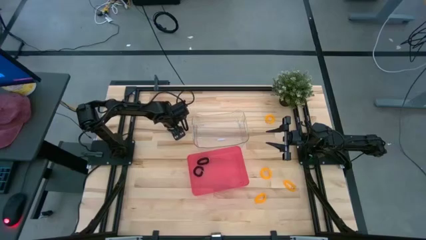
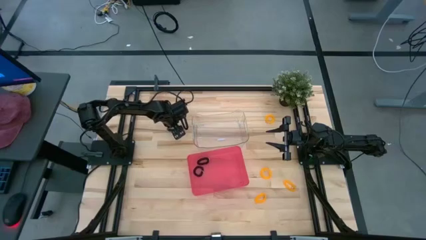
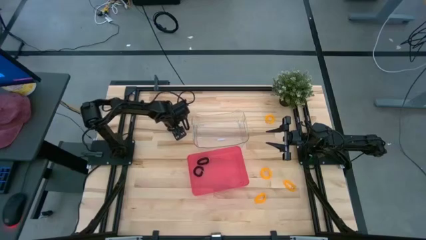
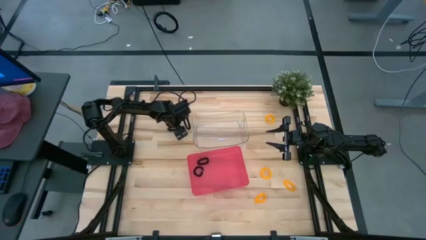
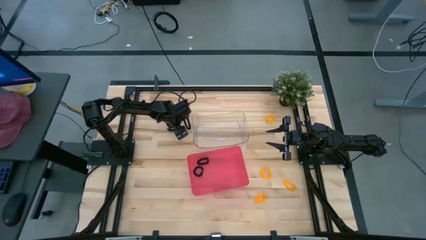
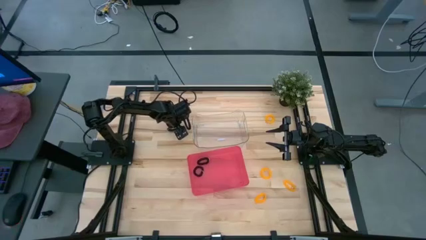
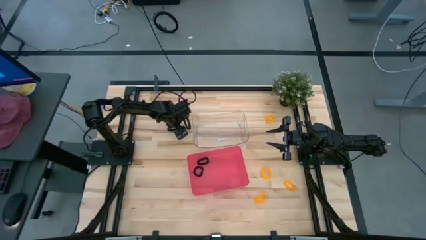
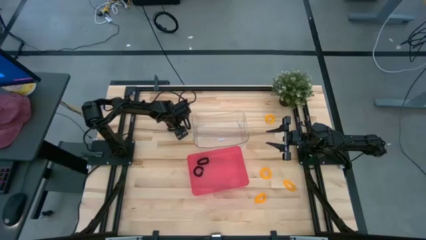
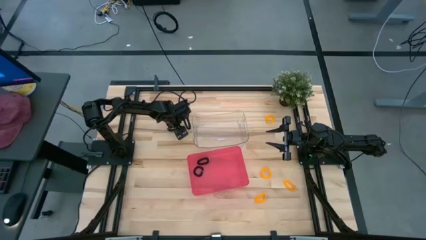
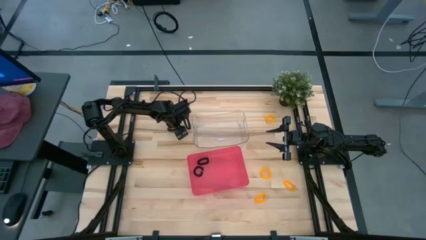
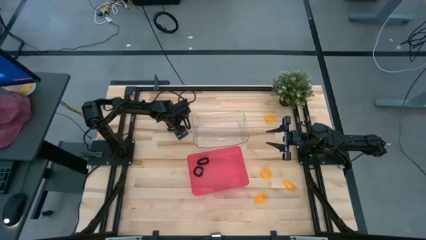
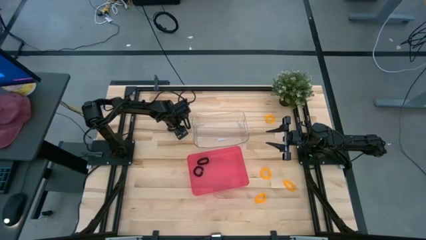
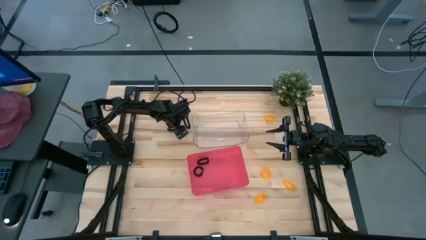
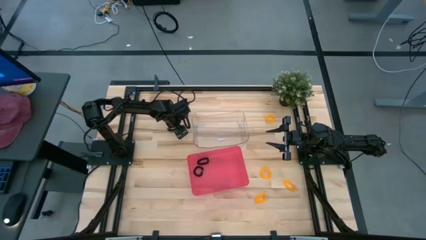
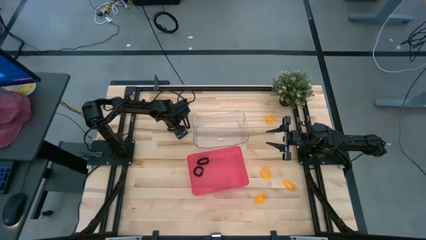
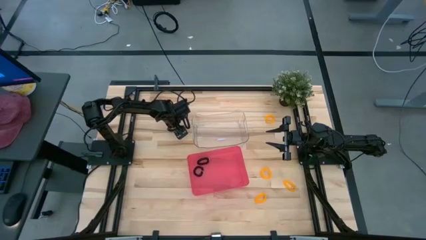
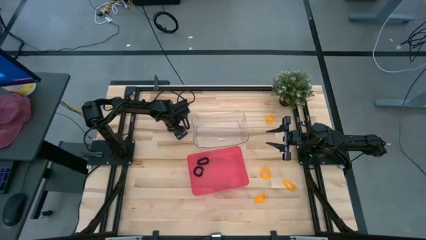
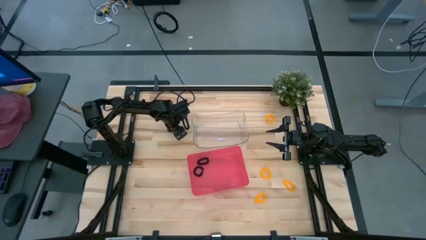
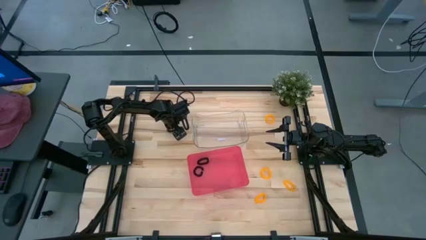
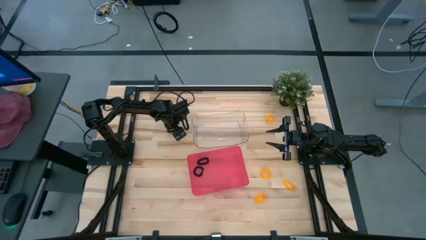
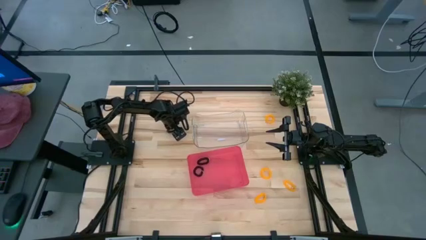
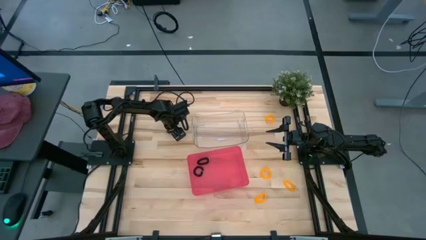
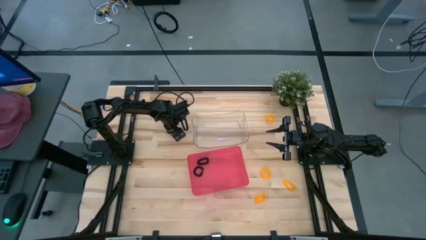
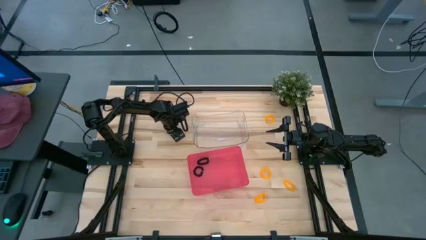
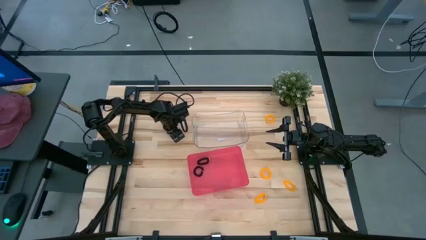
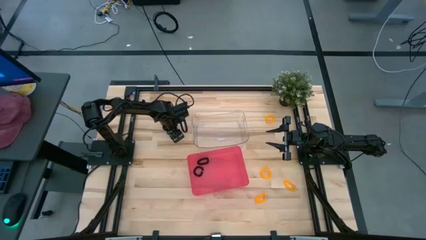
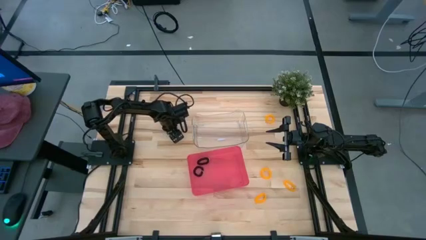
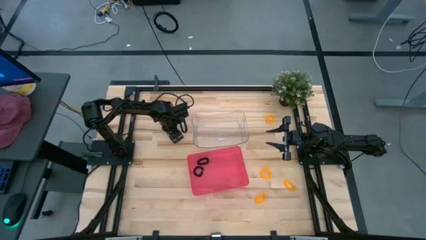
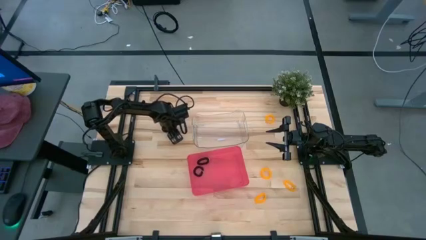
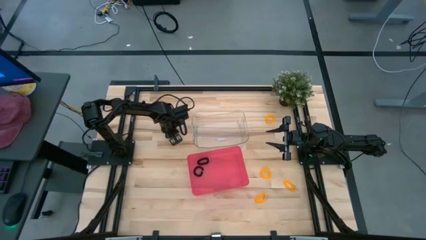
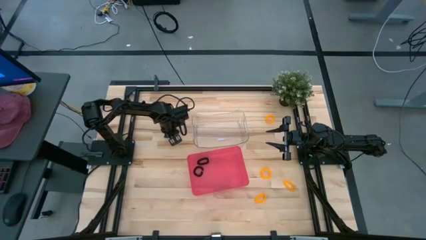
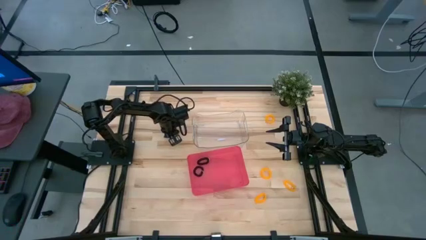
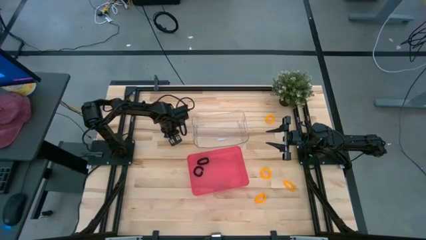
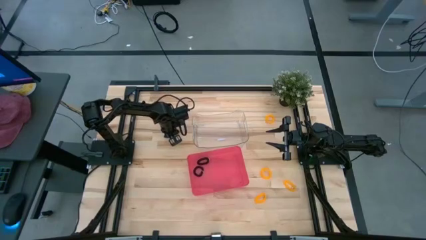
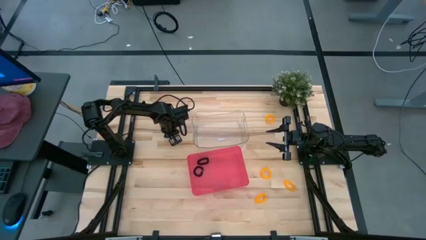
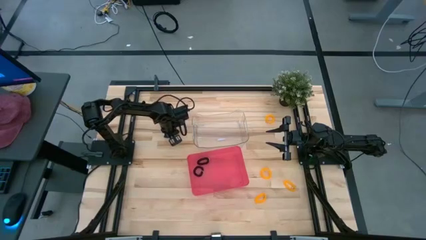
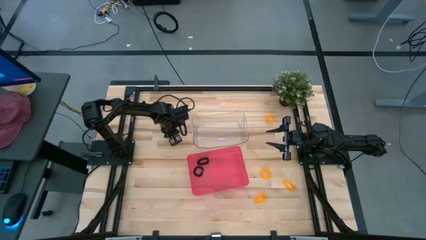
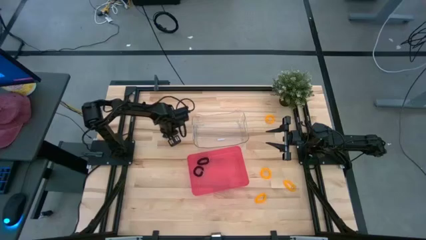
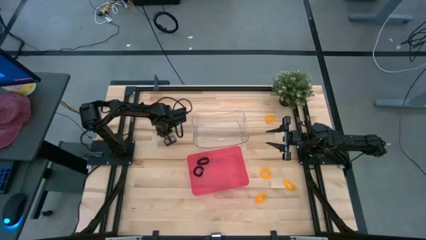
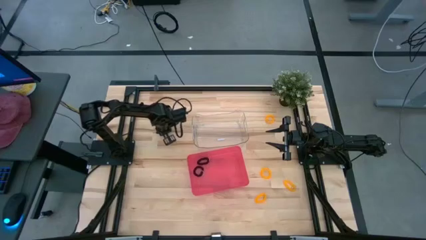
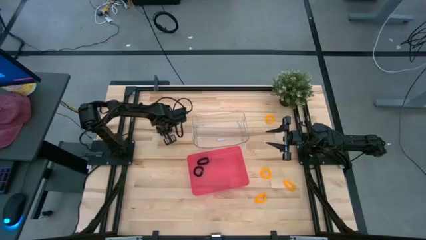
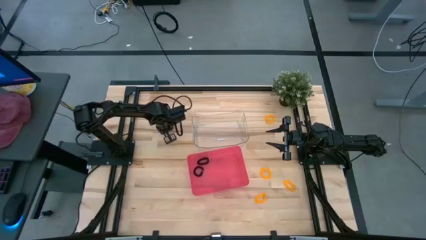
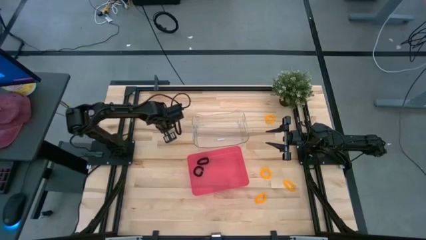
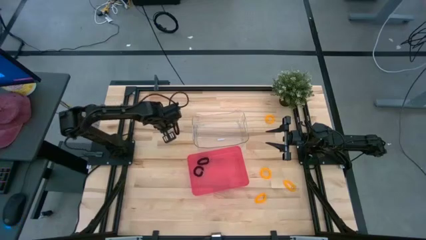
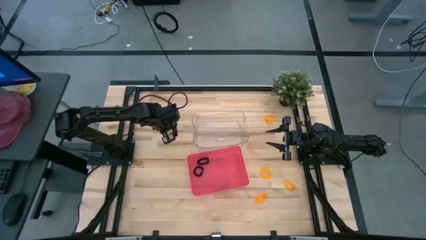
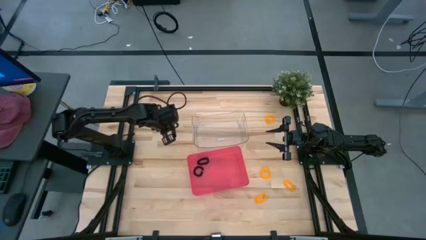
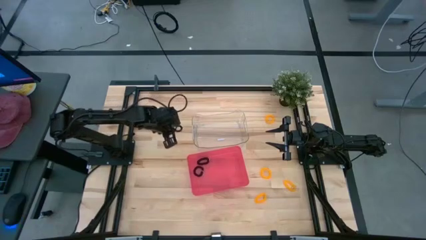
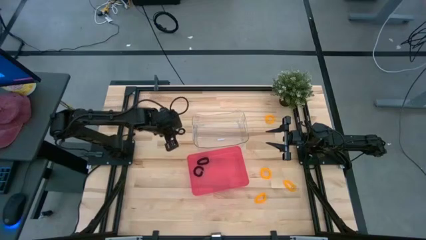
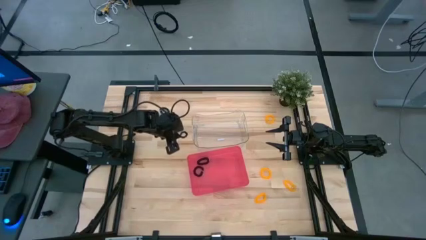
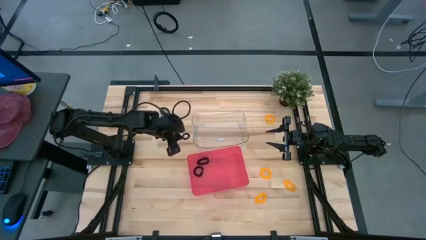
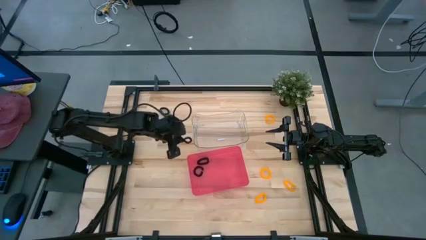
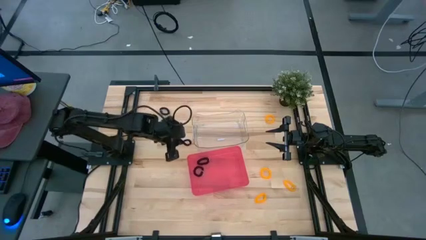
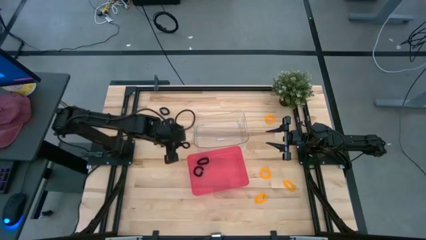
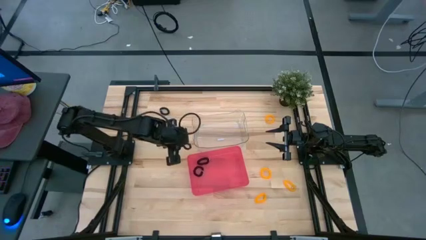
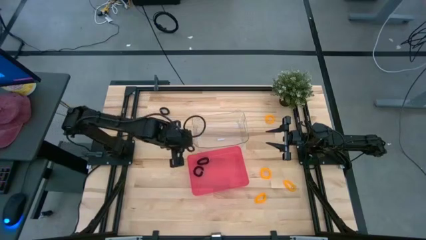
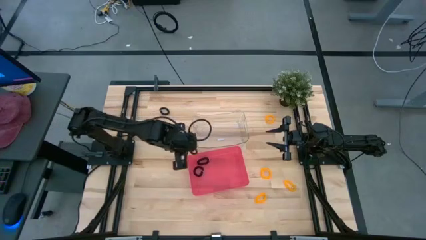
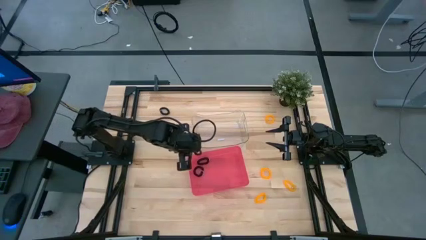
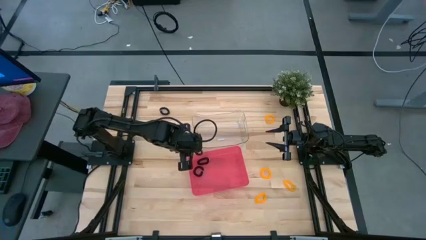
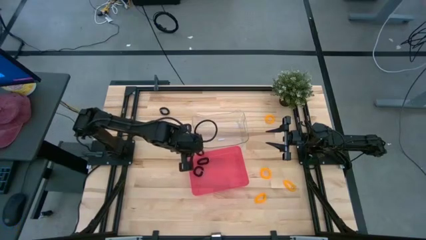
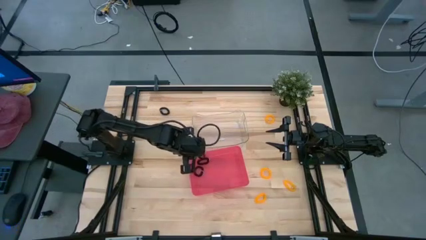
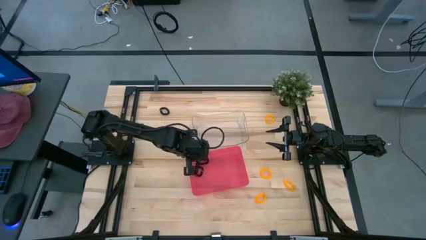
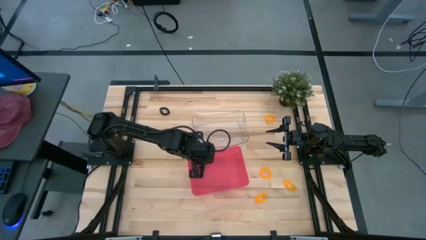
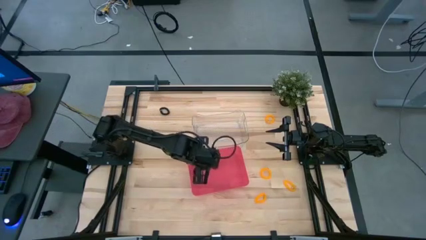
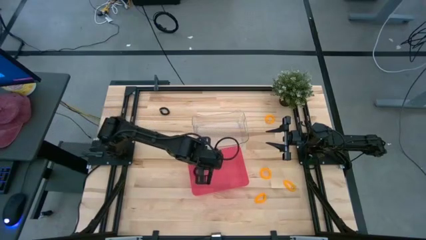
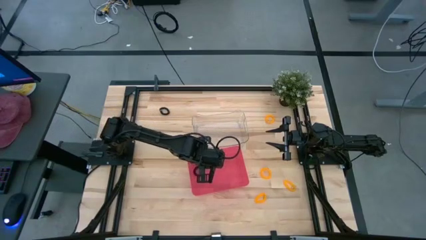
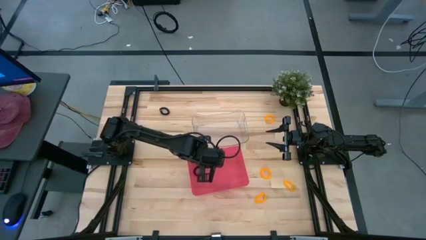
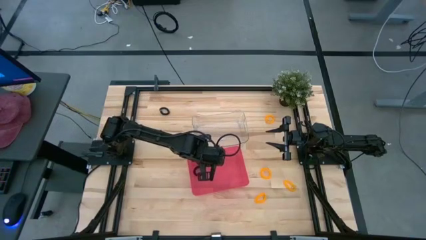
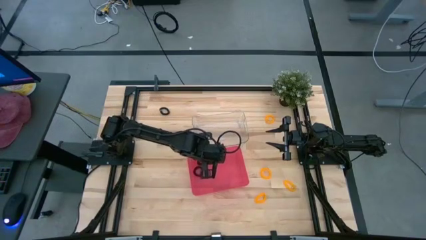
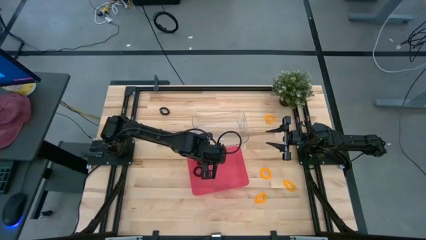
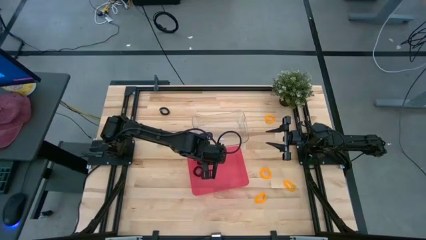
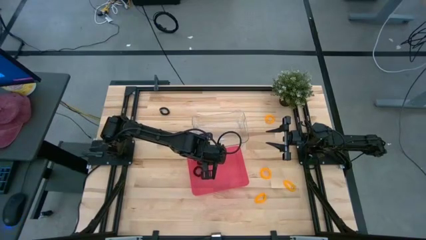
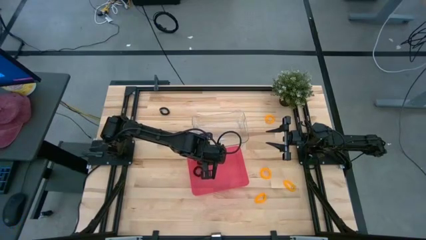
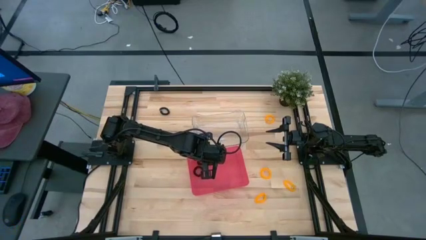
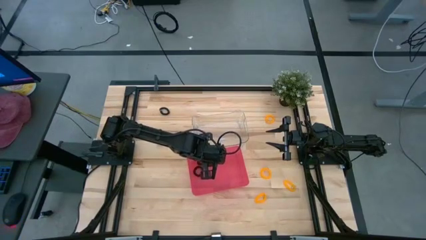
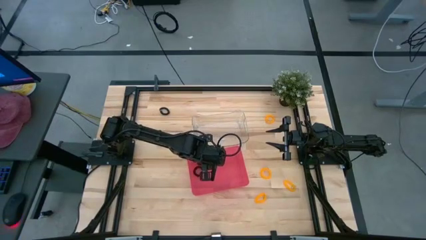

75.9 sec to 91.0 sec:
Task: Sort spring keychains
Put the bottom black spring keychain into the red bin
